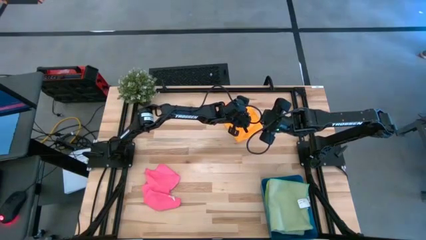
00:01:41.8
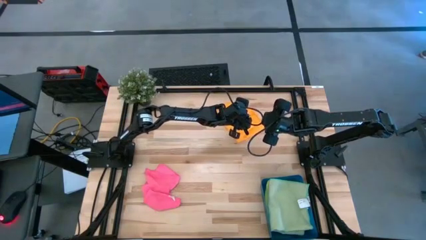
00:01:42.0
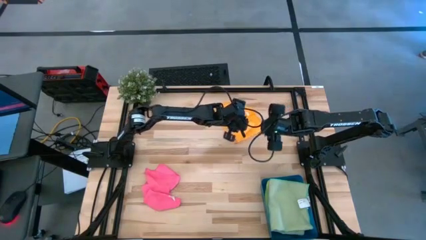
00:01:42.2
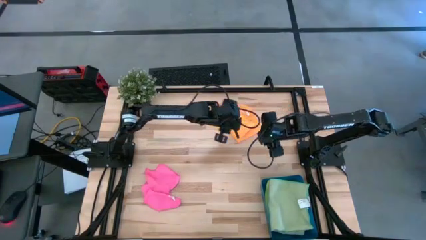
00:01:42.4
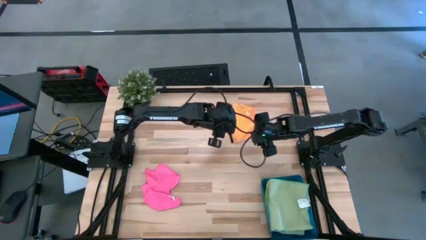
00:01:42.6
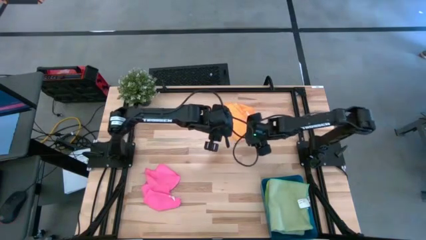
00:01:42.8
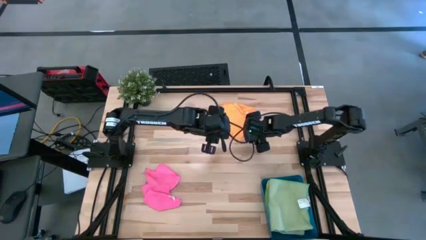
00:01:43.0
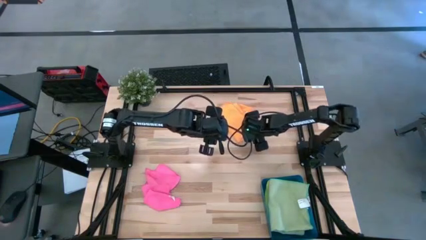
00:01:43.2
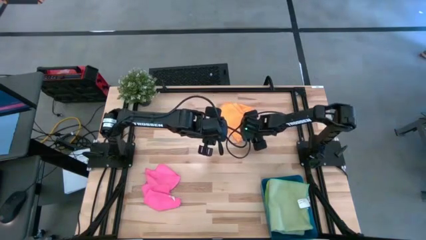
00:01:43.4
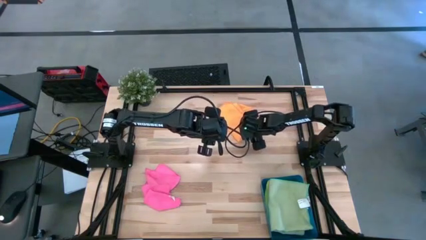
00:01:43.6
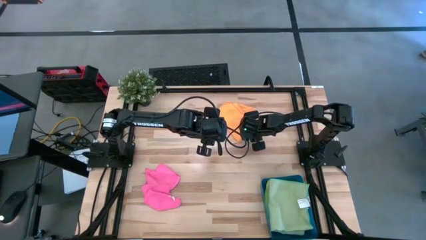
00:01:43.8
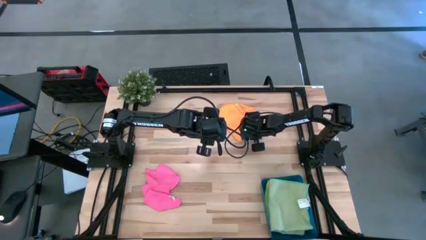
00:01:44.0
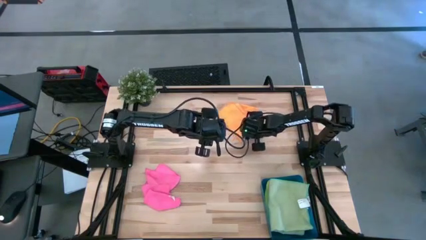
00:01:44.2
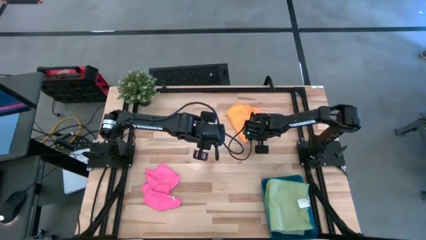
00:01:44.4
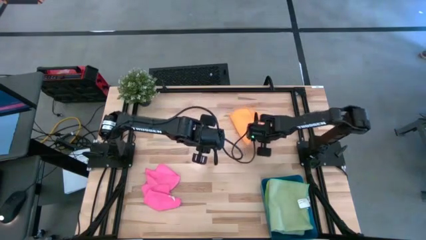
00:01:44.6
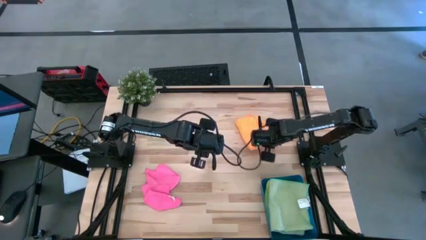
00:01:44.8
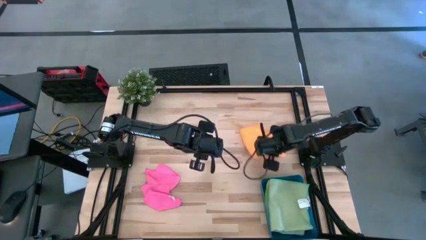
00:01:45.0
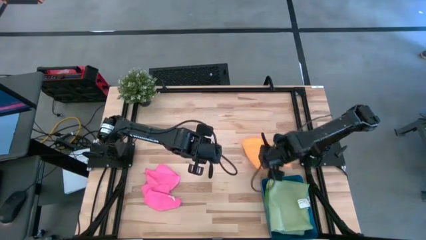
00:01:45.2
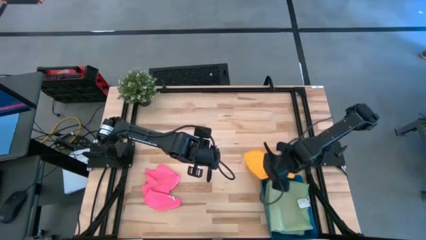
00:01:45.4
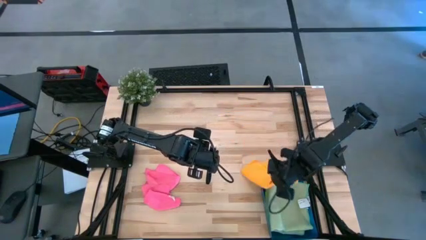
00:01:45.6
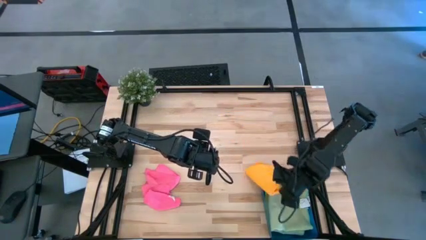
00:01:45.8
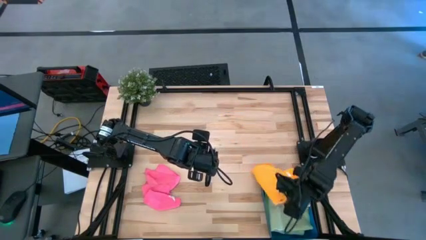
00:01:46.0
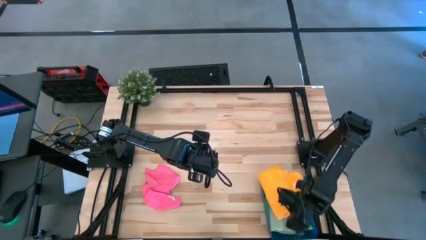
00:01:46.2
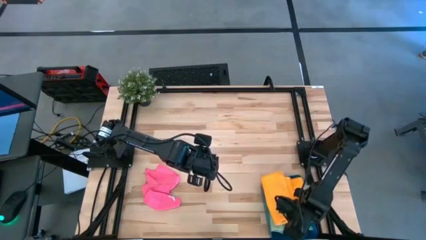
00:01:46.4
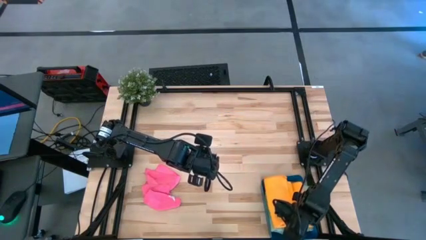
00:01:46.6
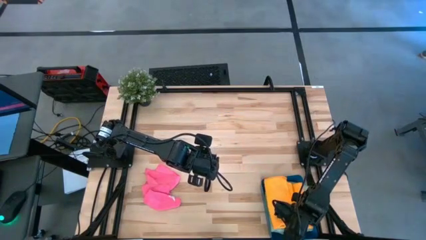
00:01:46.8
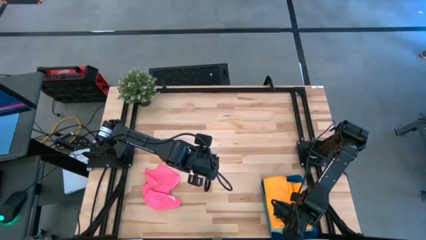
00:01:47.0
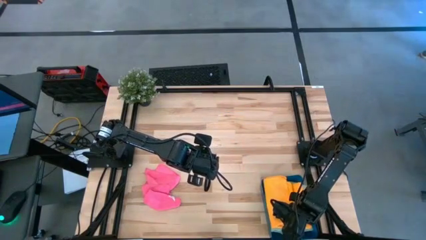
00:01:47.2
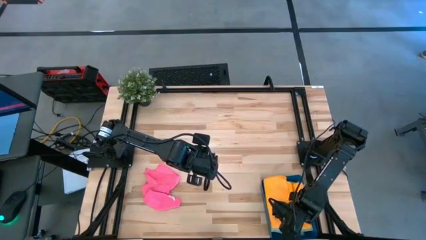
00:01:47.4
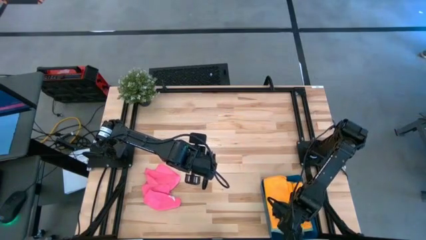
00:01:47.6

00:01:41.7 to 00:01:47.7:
Task: Fold microfiber towels
Put the folded orange microfiber towel into the blue bin

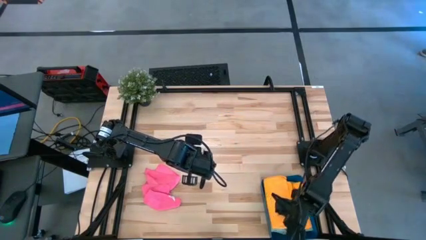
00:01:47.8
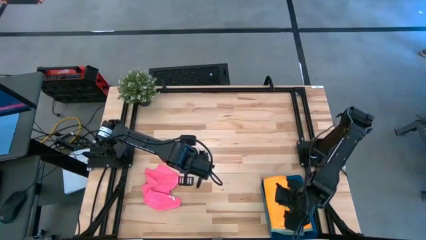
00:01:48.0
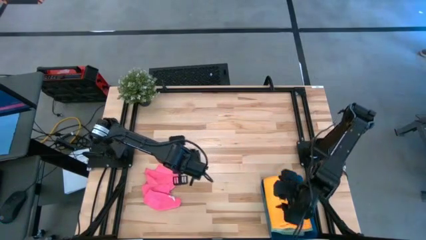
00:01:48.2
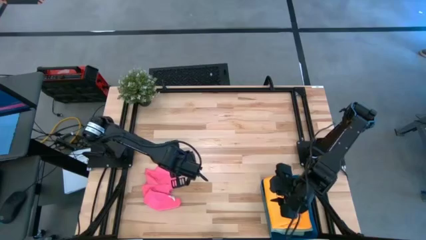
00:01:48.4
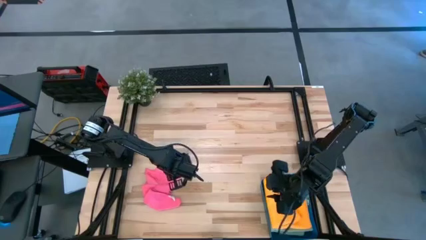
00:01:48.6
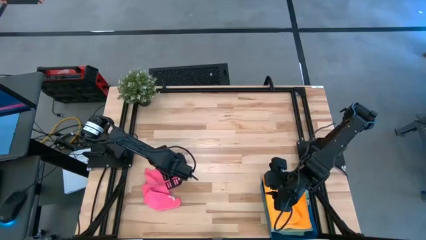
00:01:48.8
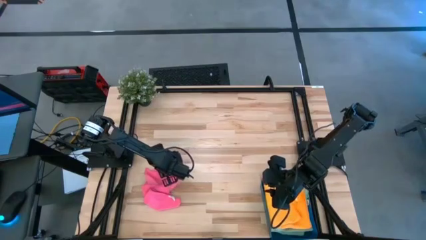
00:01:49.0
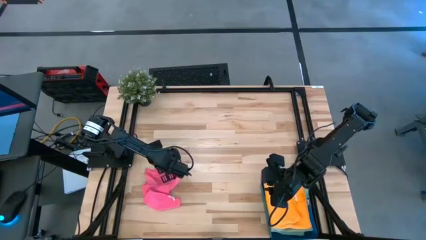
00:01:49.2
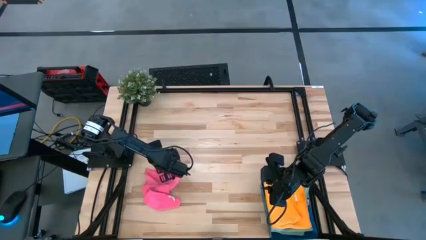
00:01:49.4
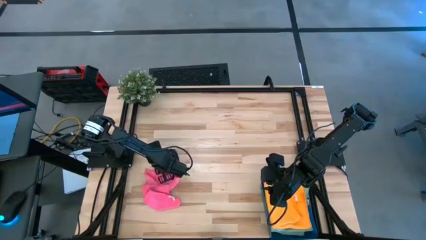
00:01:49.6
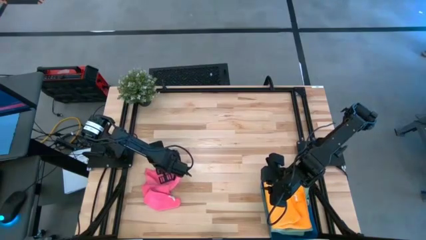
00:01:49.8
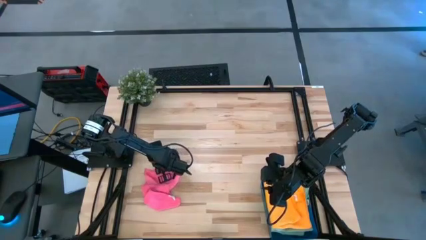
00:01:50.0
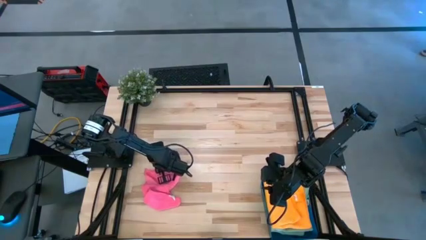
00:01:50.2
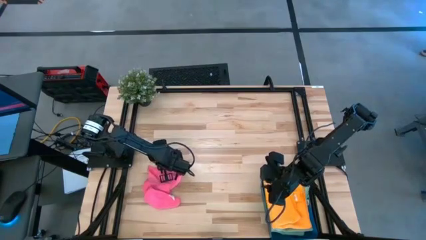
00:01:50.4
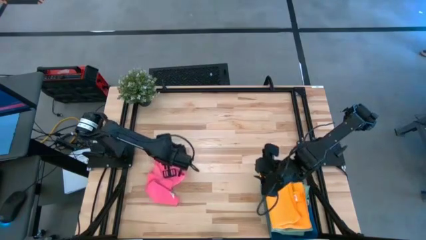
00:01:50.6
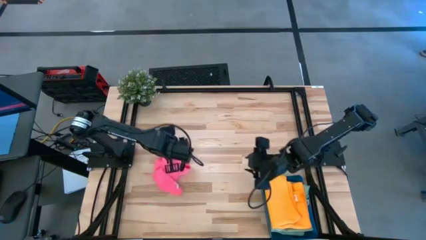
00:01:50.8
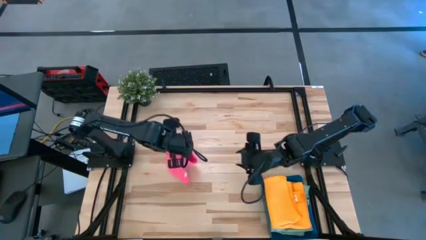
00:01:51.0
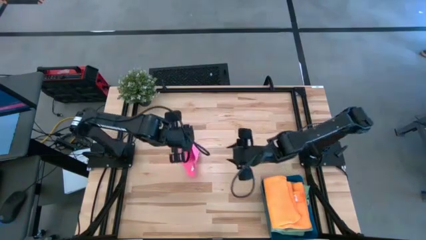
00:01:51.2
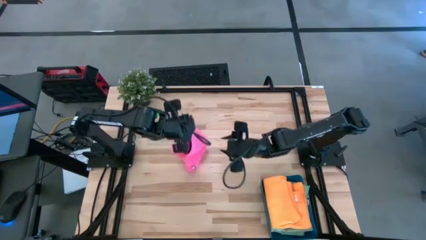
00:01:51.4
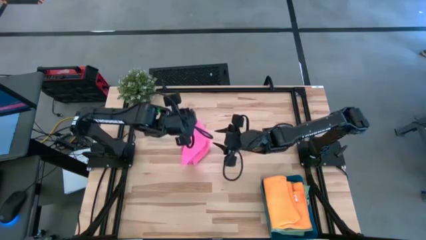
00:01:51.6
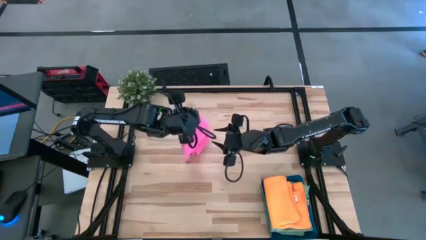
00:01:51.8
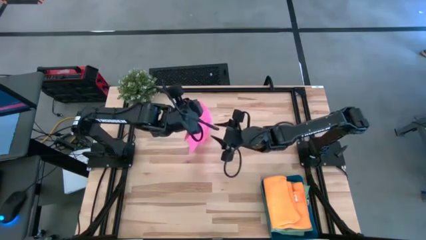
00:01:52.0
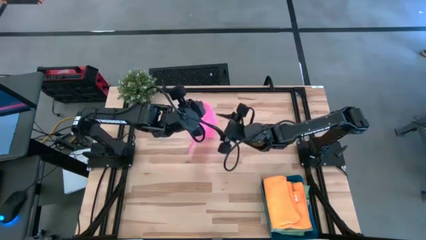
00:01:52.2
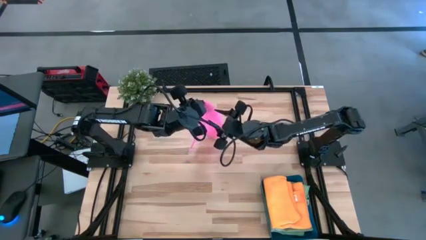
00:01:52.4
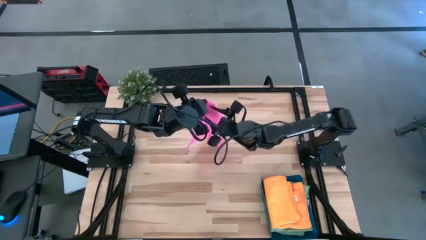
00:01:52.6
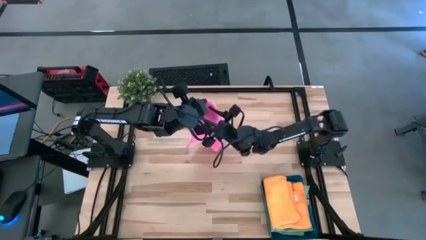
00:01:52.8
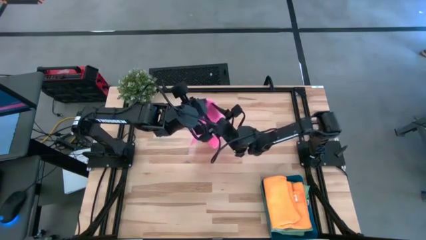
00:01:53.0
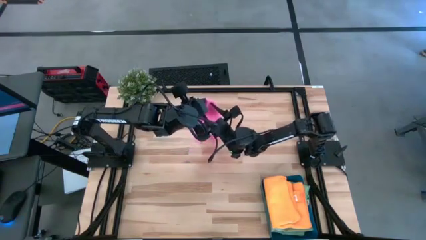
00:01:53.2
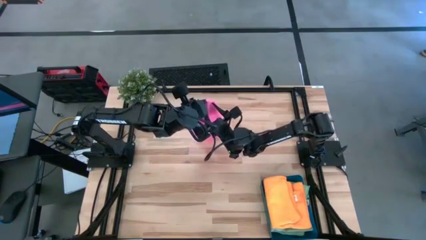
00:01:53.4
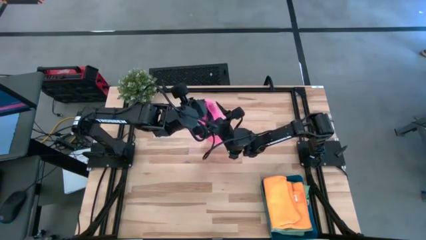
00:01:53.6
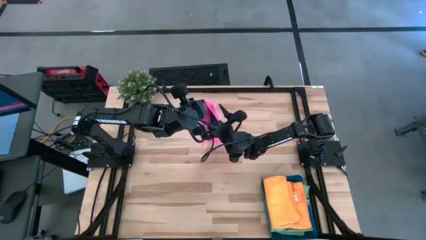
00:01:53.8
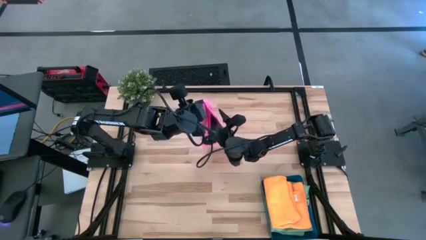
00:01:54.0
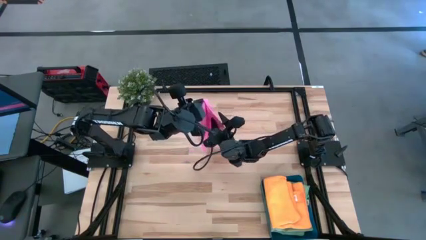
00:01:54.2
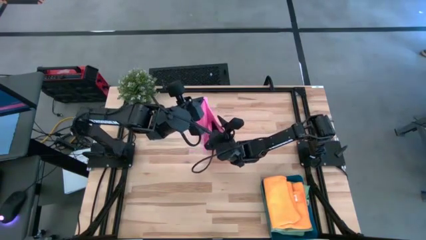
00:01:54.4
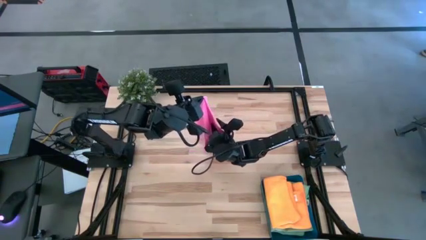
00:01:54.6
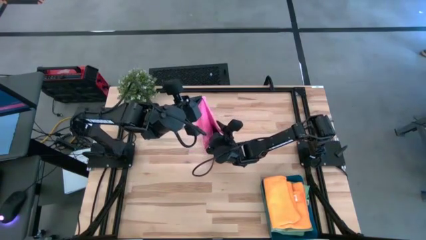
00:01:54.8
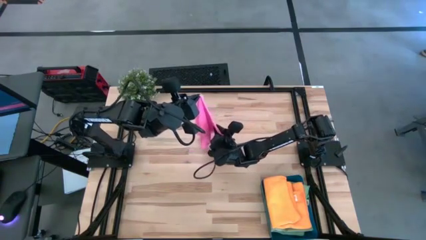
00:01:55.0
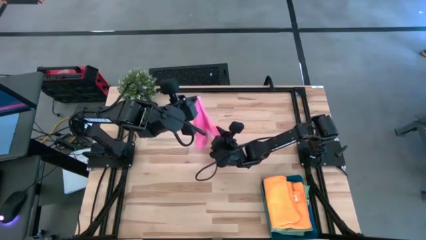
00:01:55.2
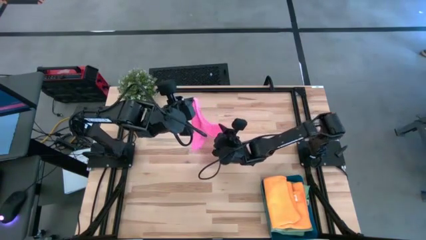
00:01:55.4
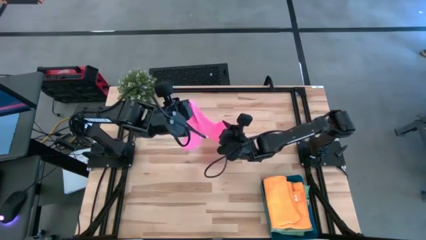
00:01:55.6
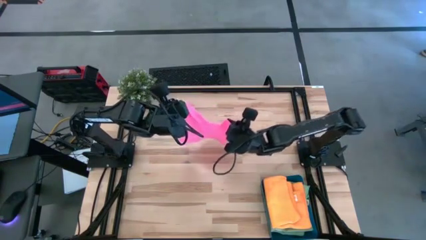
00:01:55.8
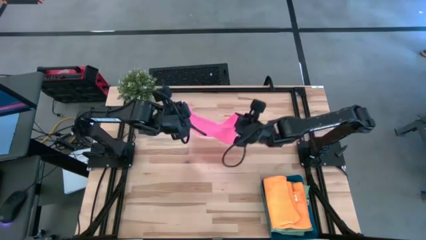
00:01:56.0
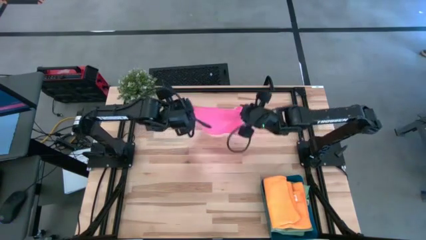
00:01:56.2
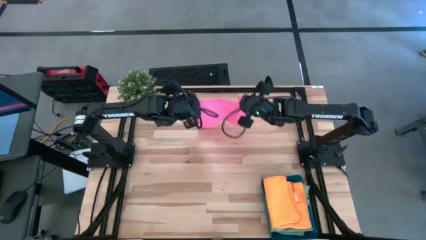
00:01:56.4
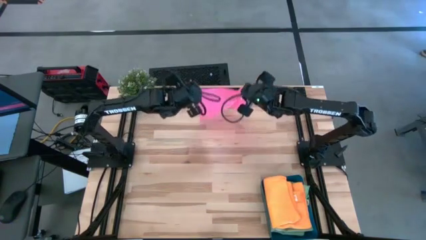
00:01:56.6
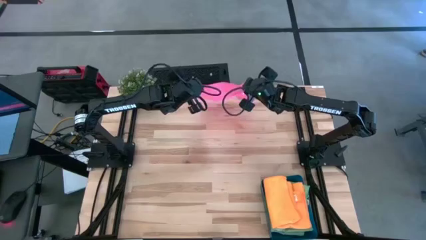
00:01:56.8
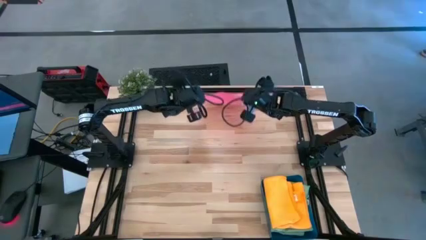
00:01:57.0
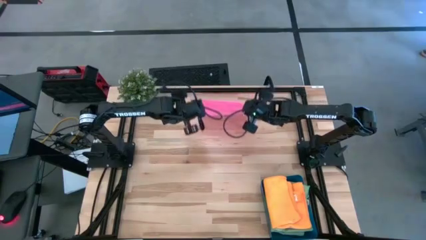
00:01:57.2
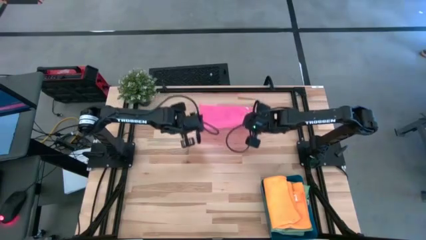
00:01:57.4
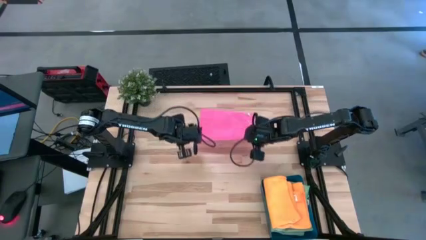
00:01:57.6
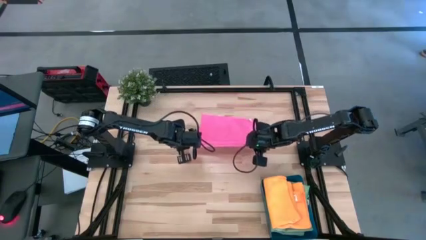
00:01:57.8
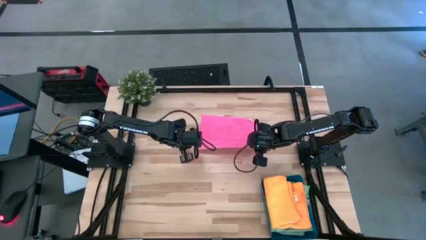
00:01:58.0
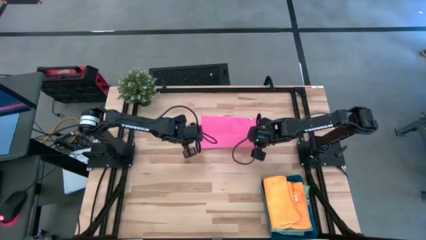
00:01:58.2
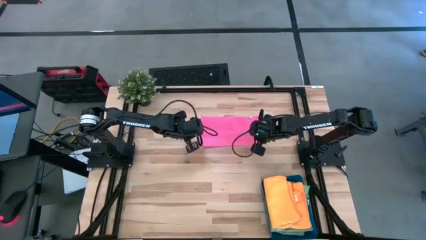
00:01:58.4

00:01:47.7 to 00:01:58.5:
Fold the pink microfiber towel
